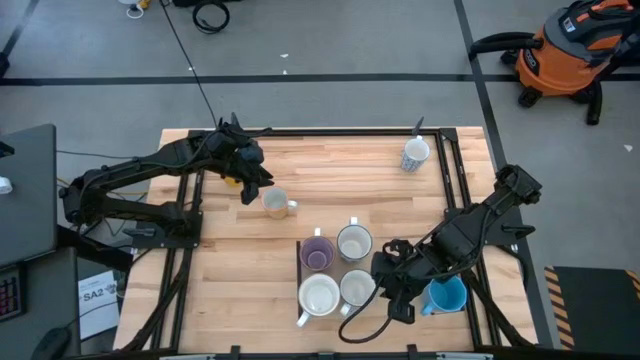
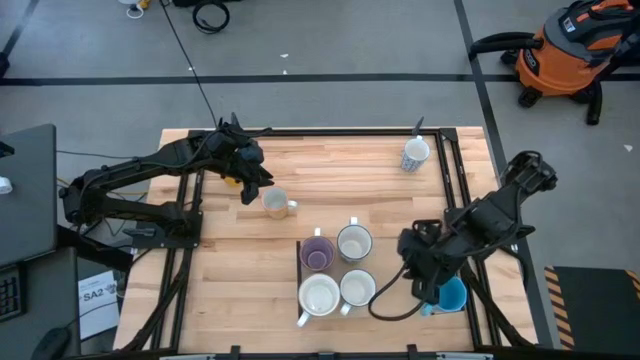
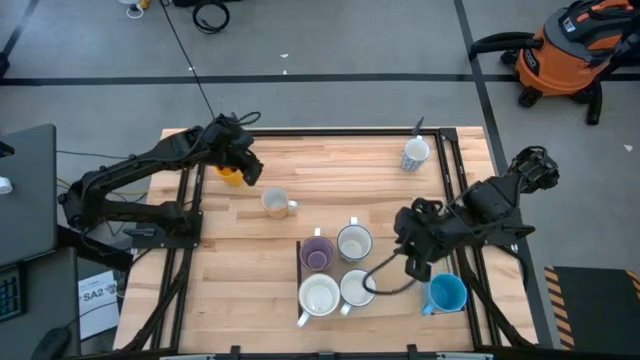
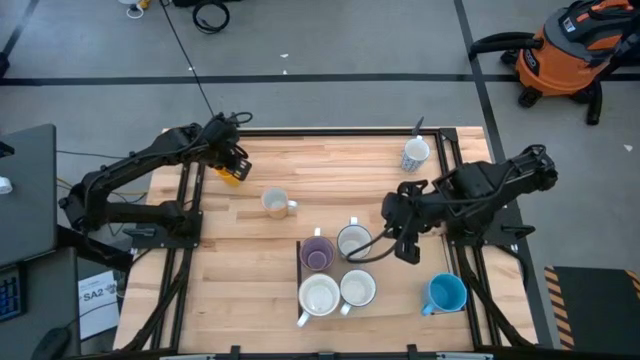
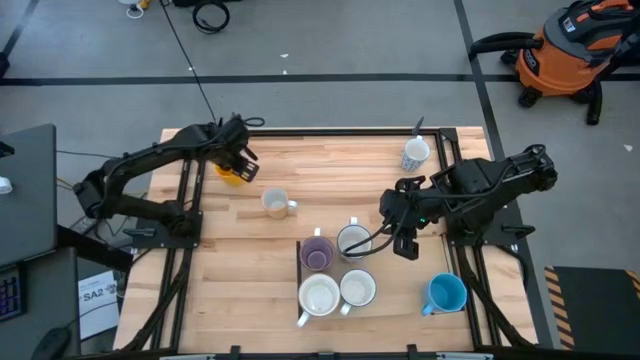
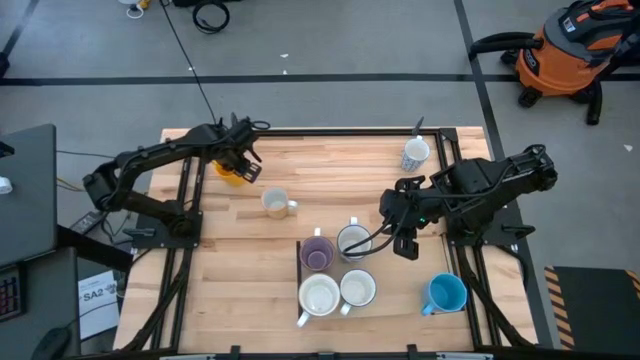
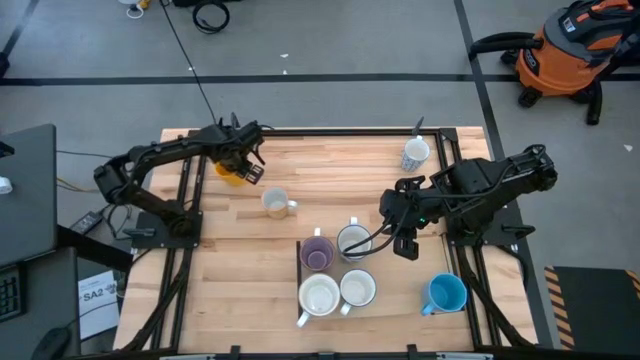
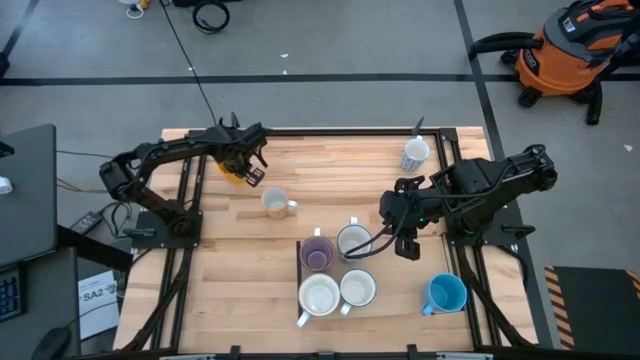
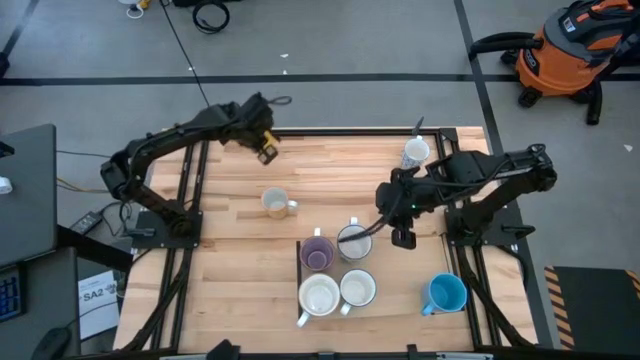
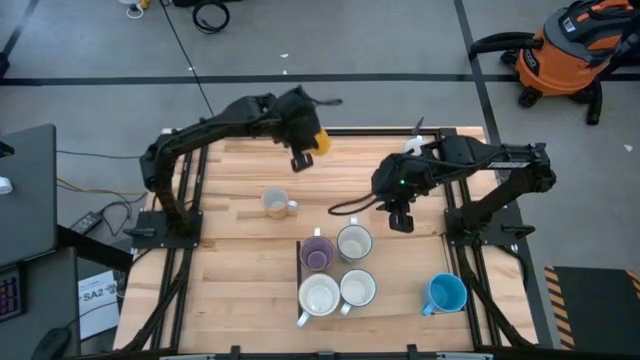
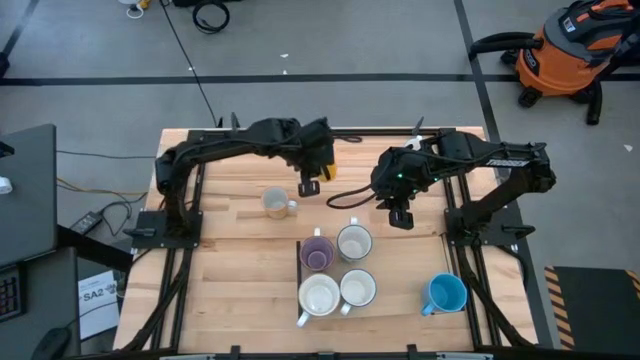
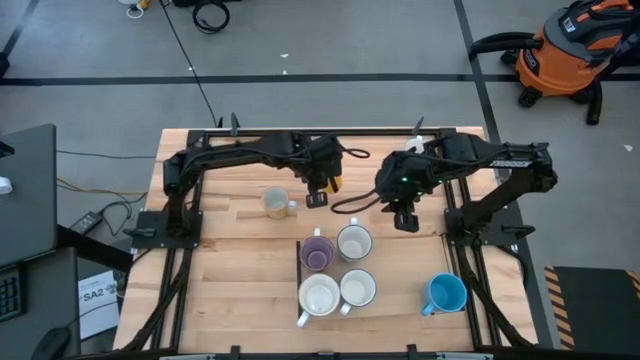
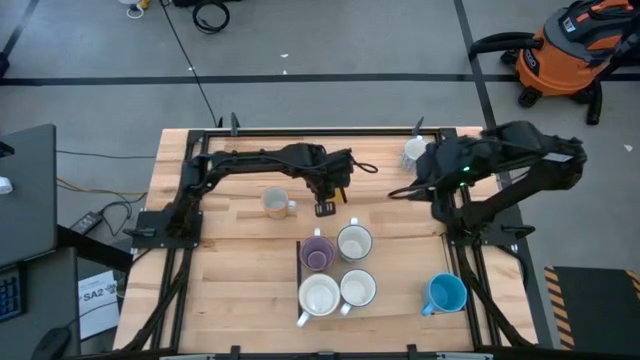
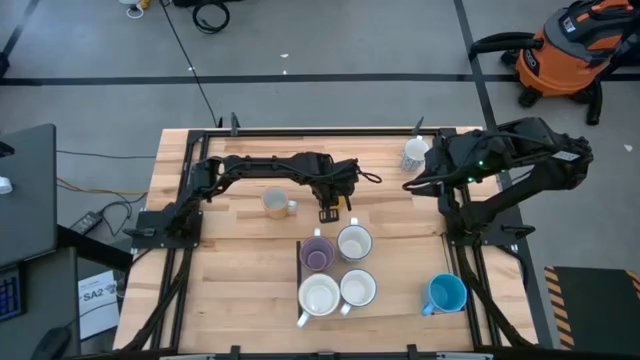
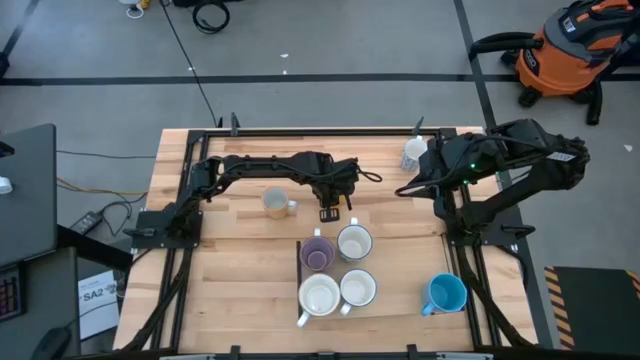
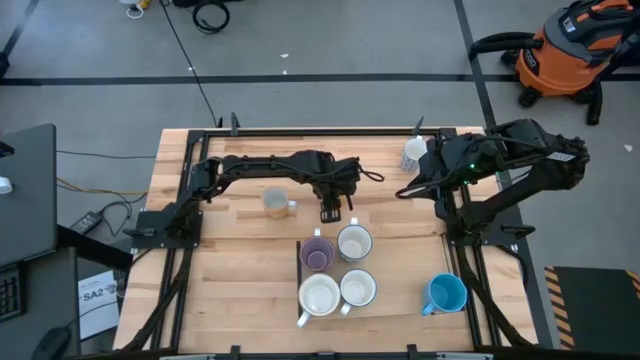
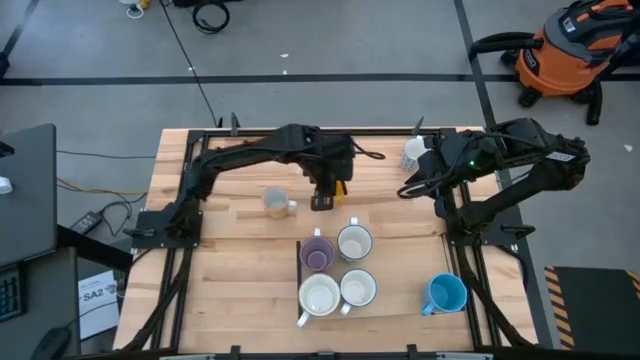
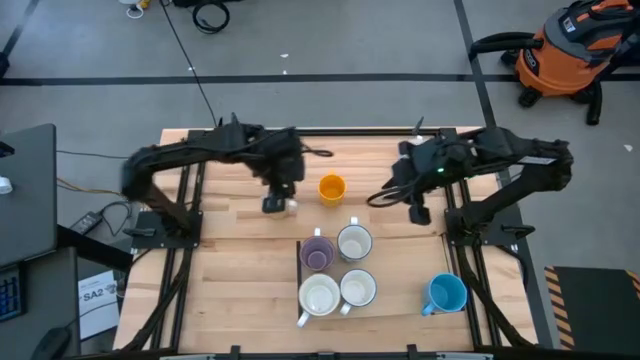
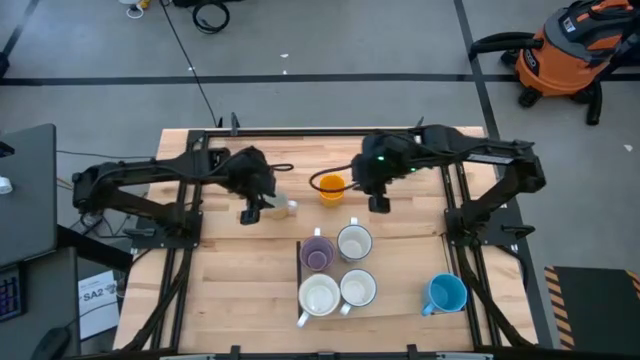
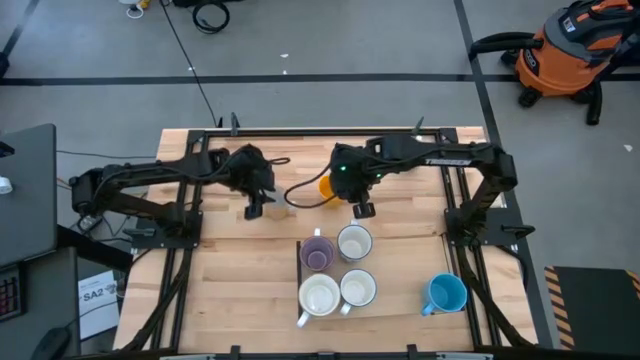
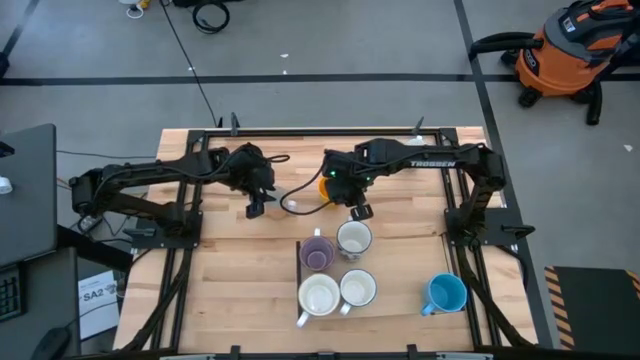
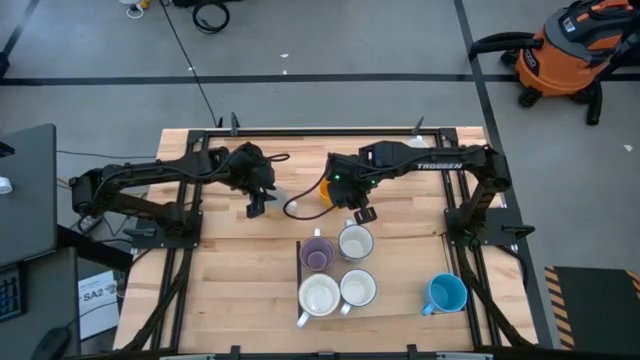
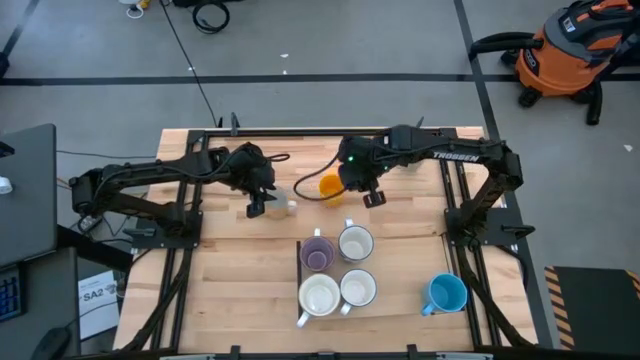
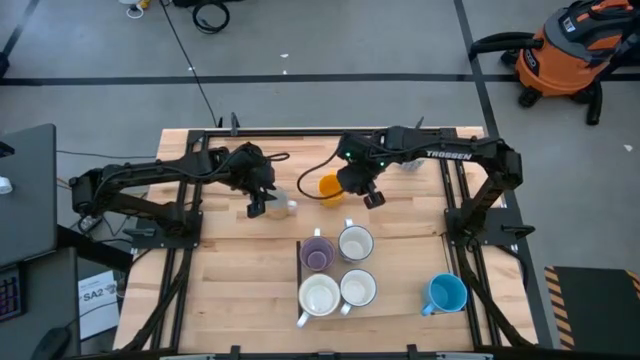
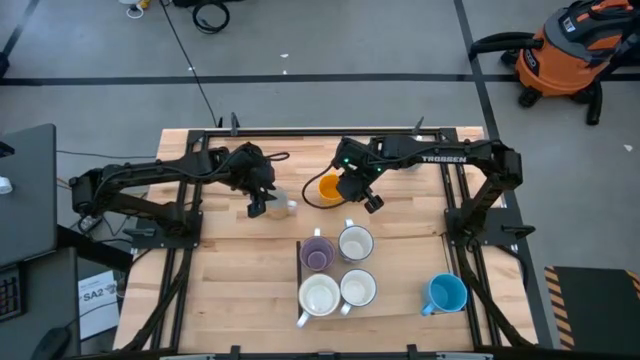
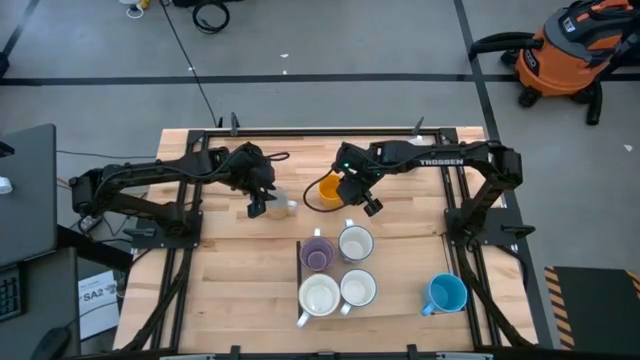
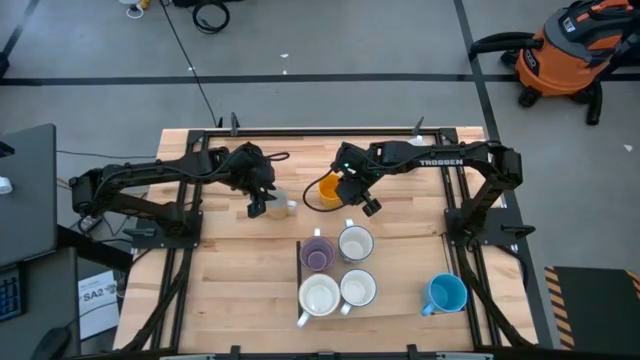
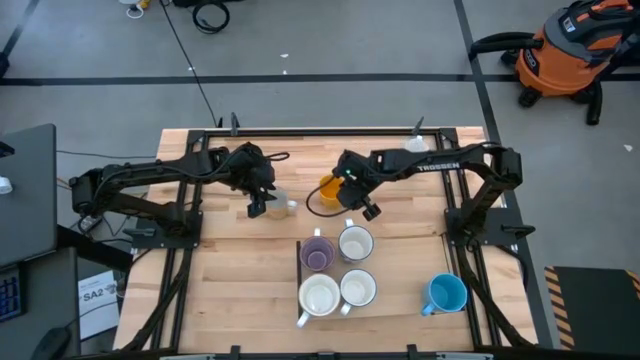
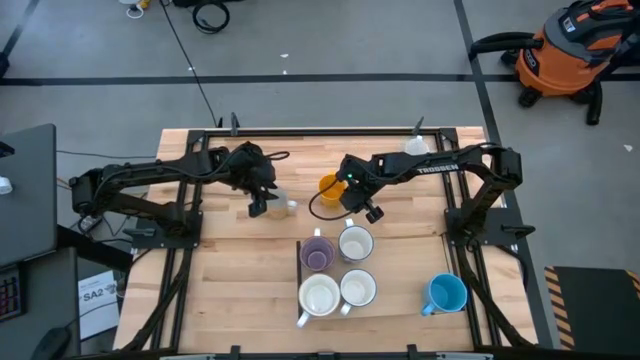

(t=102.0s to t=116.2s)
Task: Place coffee mugs
Put the yellow mug on the shelf

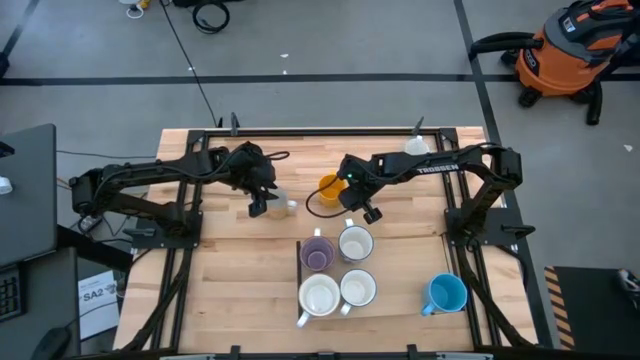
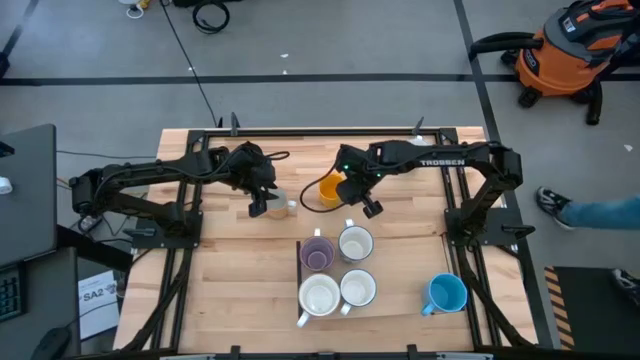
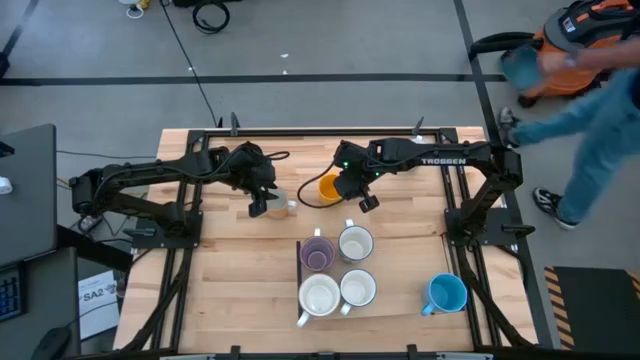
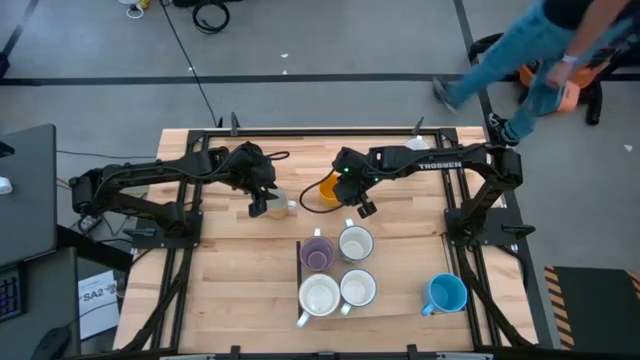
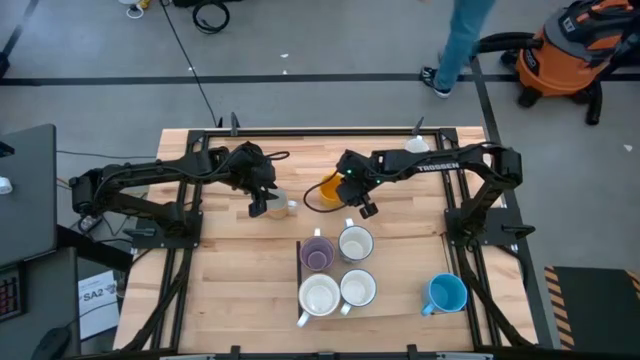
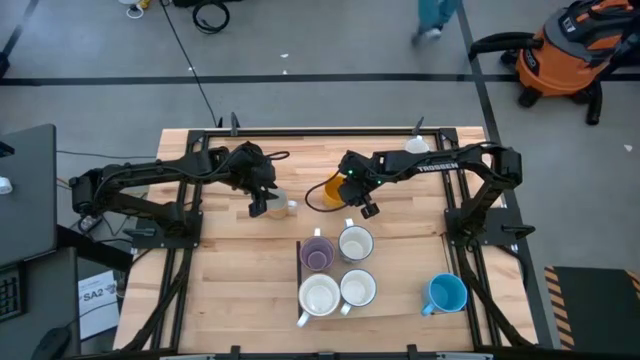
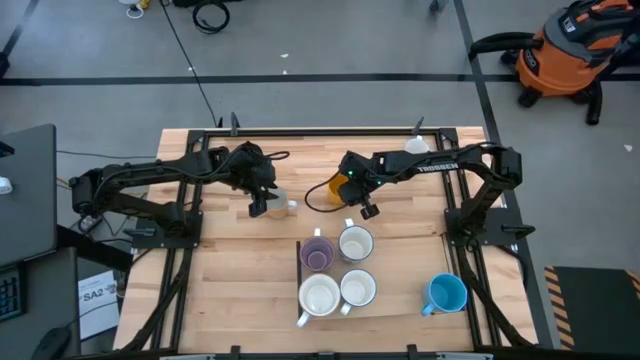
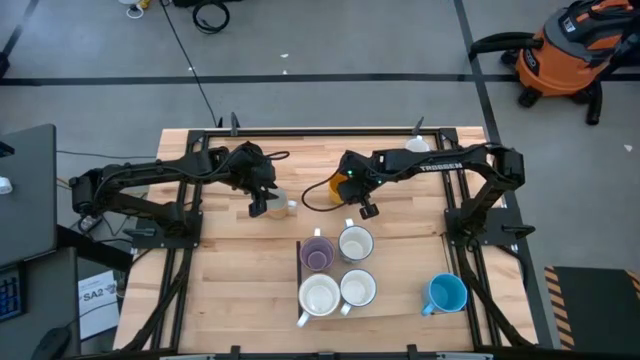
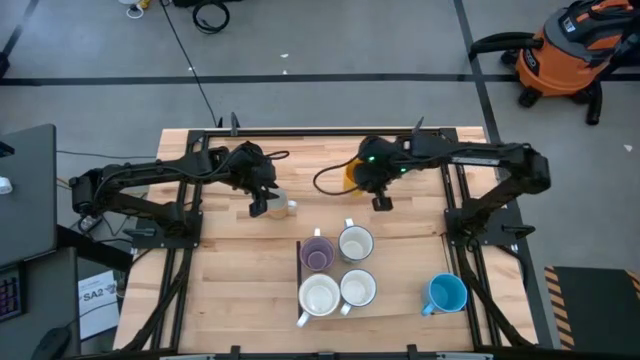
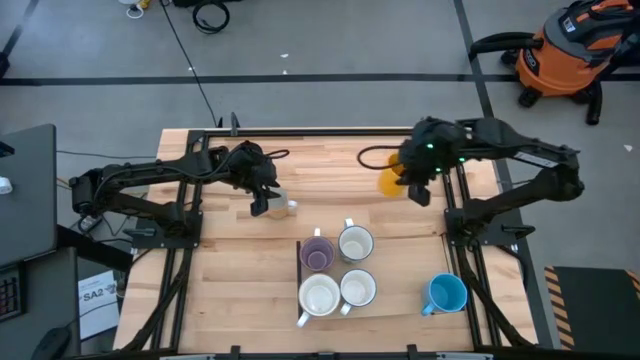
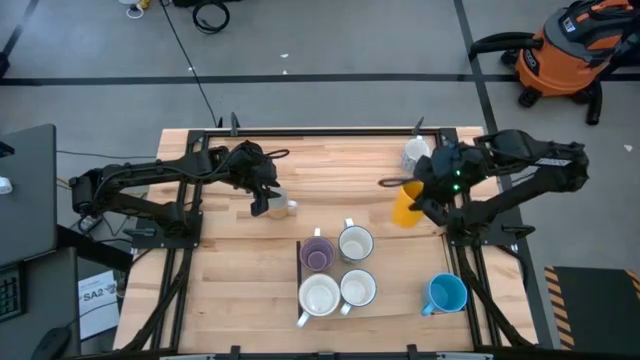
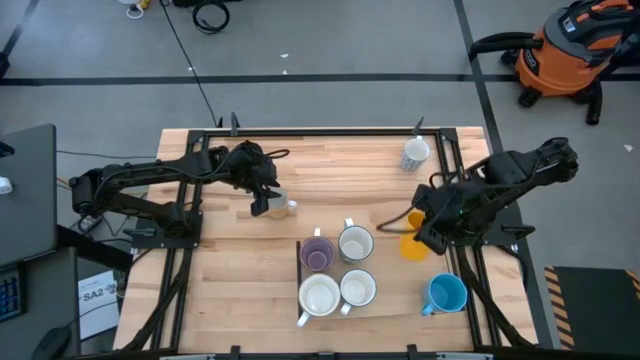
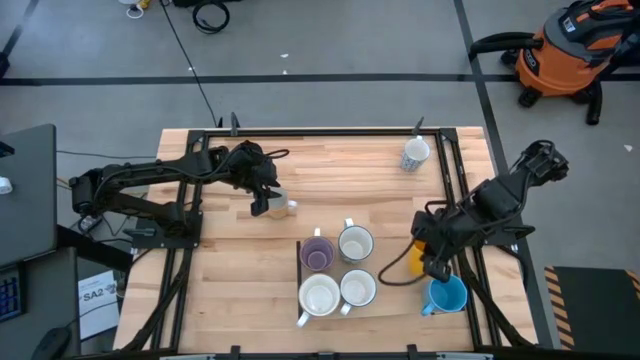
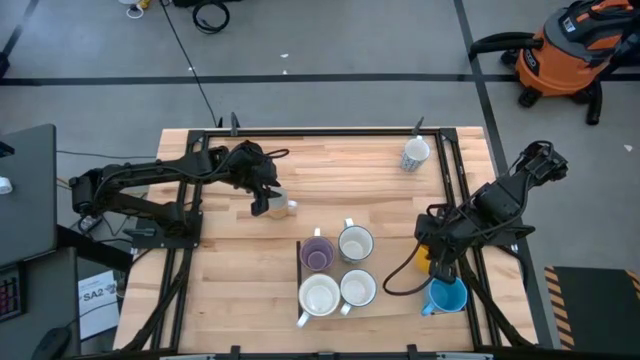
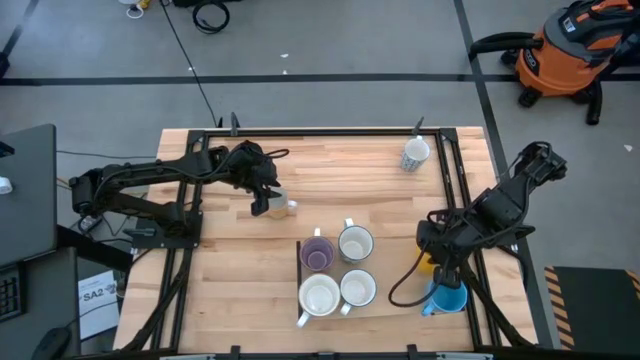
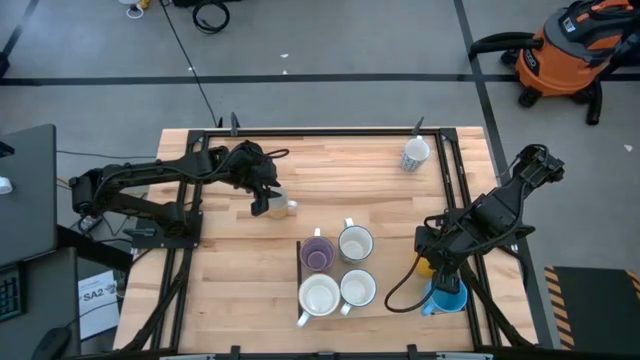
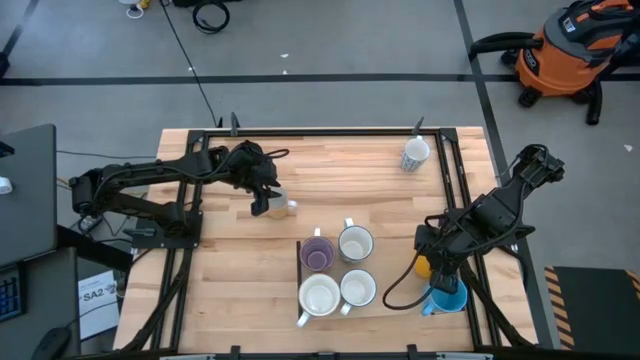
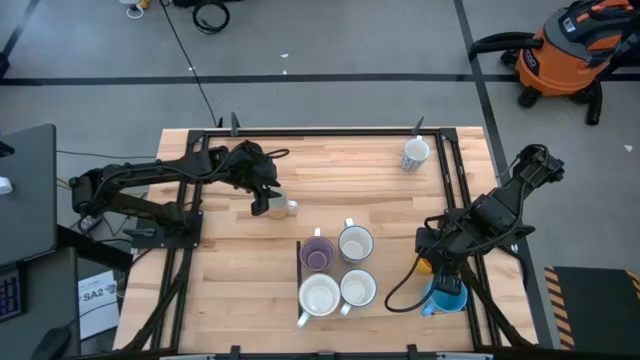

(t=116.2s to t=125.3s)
Put the yellow mug on the shelf
